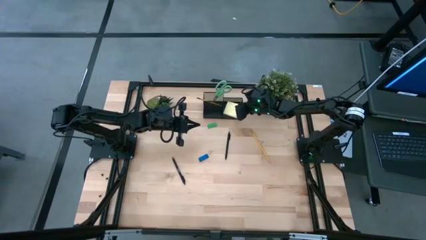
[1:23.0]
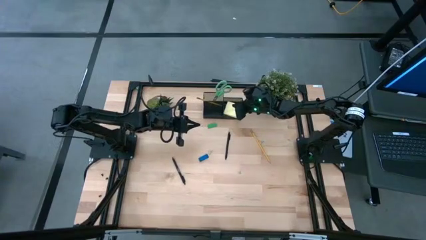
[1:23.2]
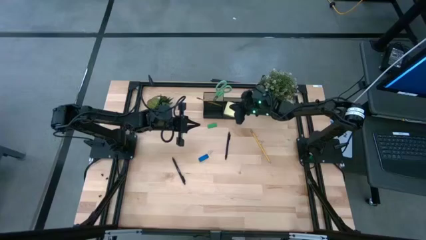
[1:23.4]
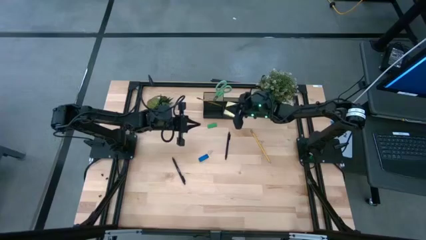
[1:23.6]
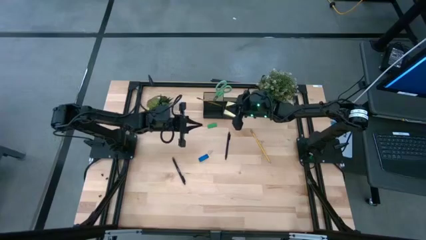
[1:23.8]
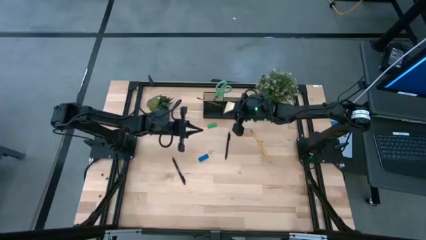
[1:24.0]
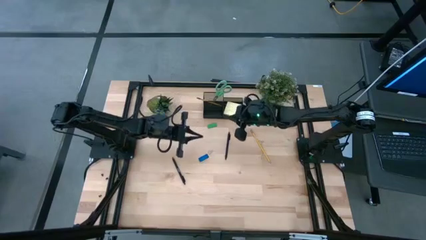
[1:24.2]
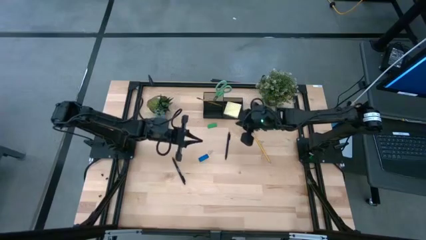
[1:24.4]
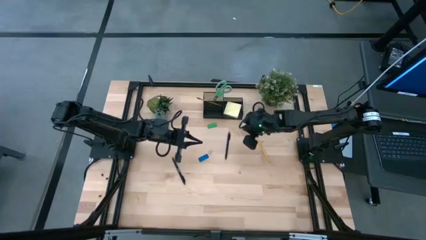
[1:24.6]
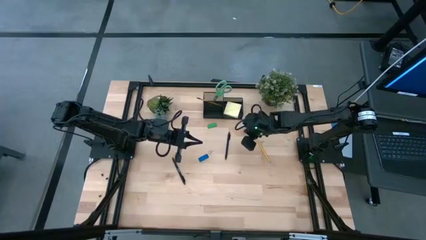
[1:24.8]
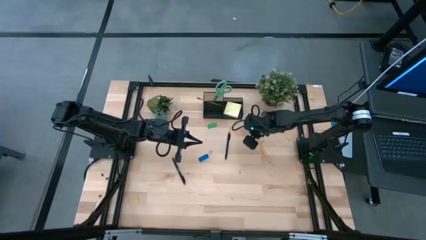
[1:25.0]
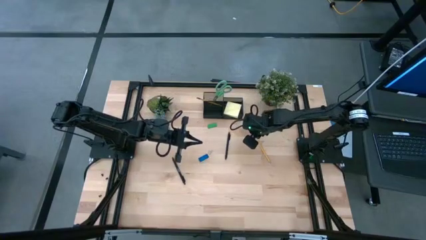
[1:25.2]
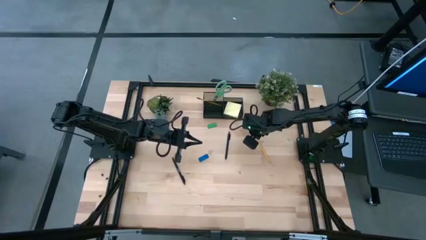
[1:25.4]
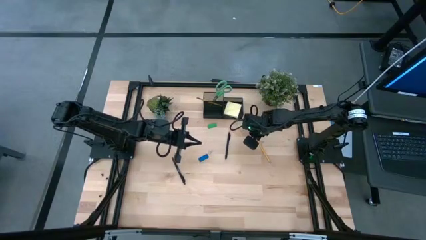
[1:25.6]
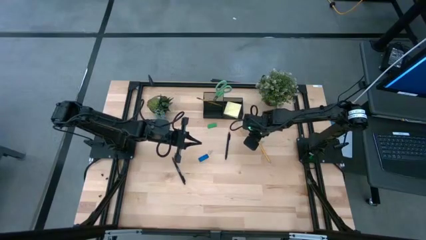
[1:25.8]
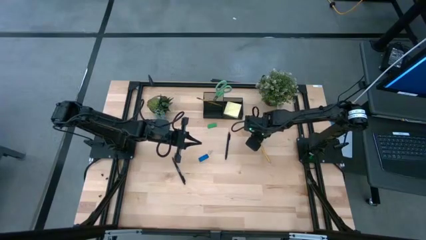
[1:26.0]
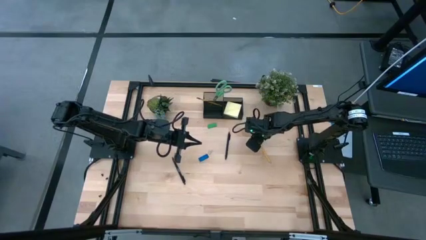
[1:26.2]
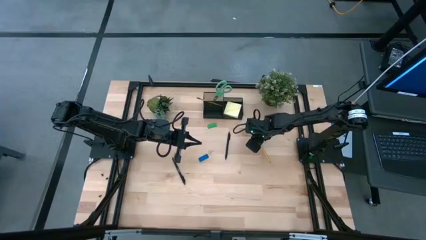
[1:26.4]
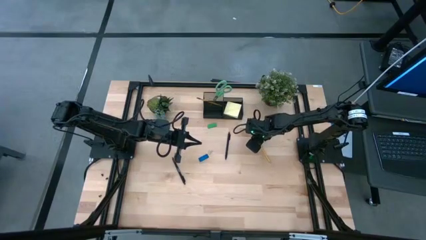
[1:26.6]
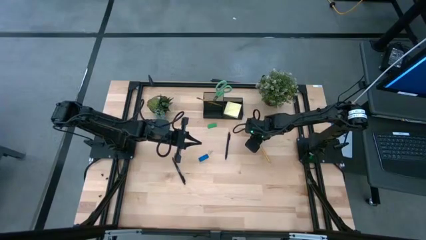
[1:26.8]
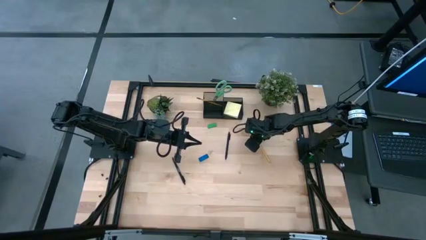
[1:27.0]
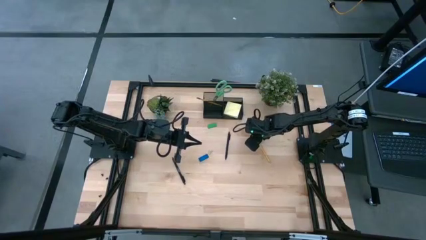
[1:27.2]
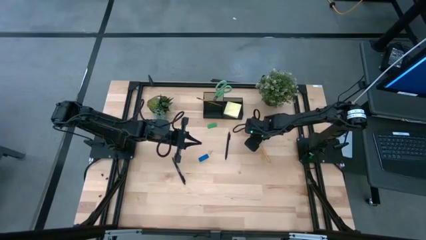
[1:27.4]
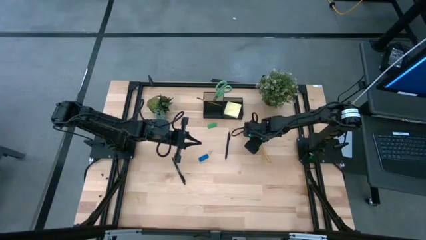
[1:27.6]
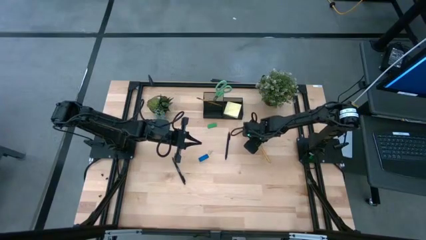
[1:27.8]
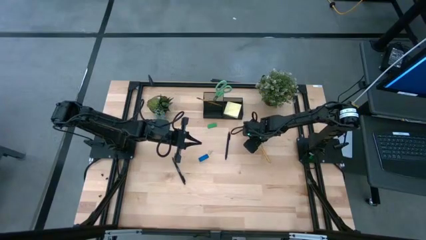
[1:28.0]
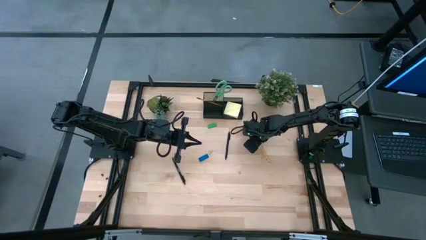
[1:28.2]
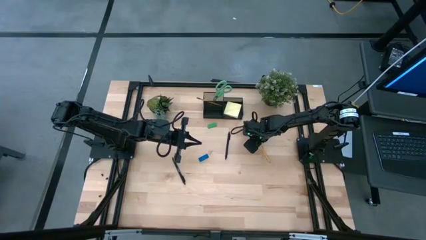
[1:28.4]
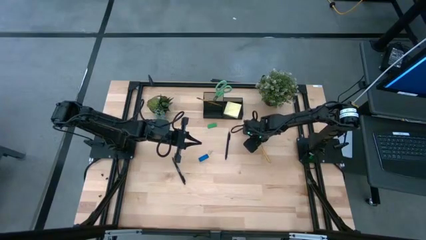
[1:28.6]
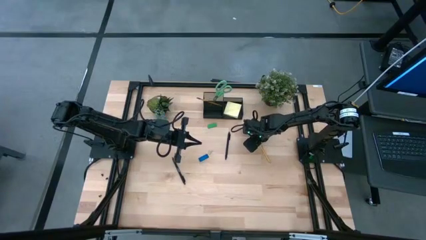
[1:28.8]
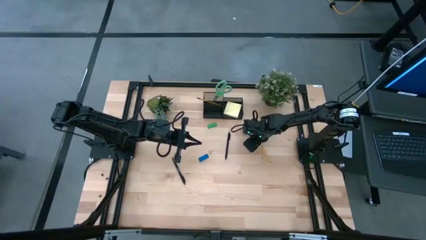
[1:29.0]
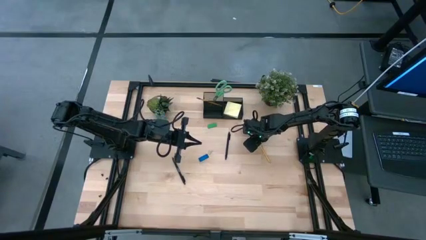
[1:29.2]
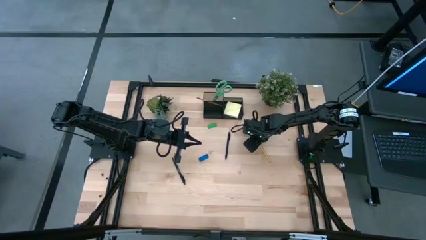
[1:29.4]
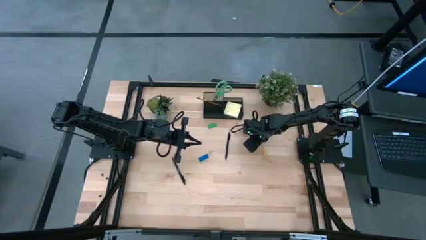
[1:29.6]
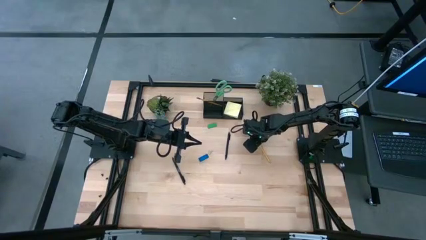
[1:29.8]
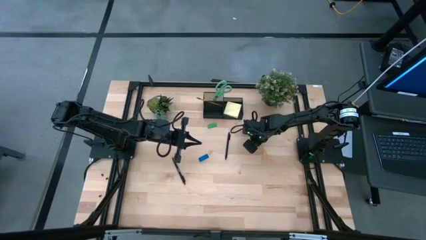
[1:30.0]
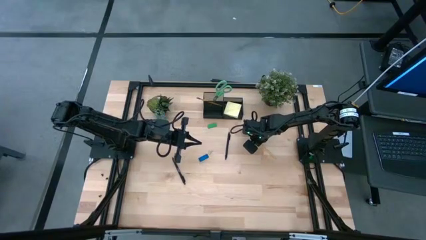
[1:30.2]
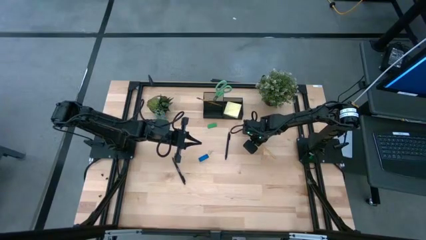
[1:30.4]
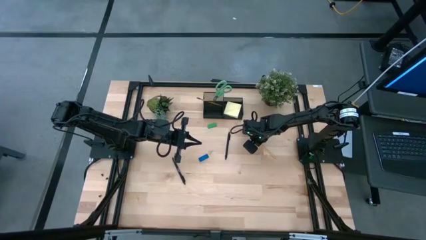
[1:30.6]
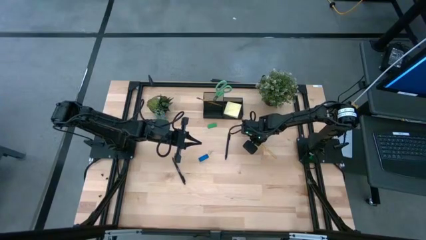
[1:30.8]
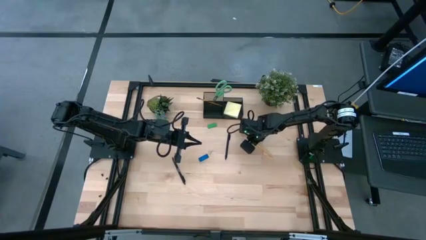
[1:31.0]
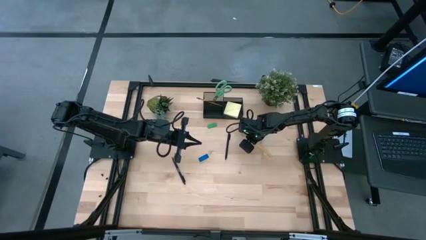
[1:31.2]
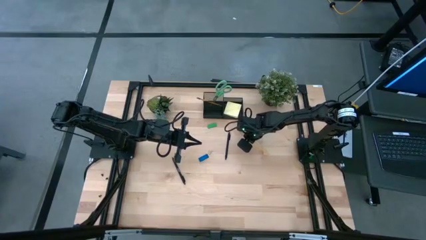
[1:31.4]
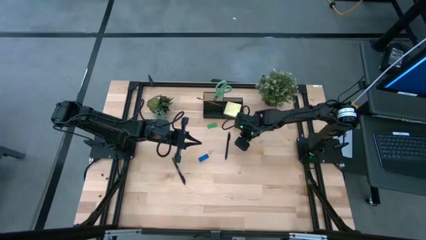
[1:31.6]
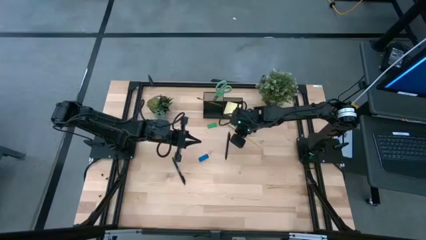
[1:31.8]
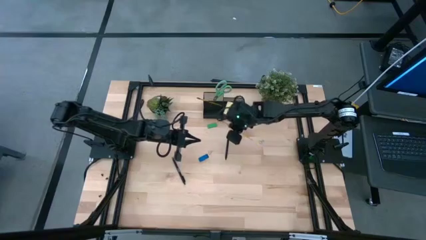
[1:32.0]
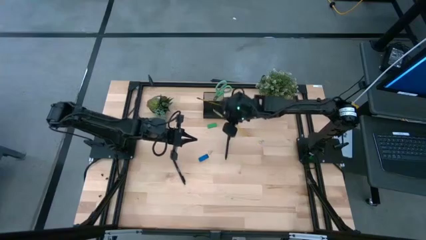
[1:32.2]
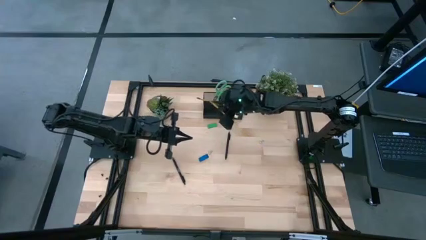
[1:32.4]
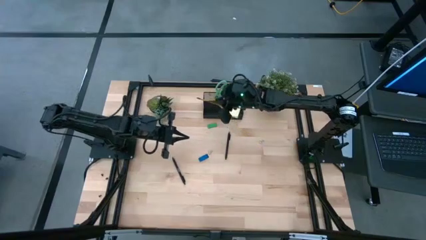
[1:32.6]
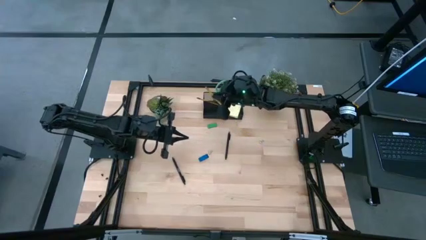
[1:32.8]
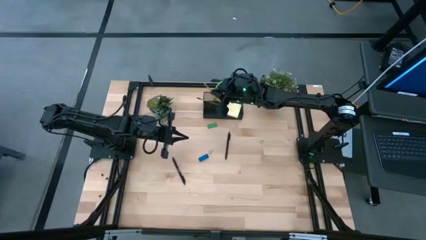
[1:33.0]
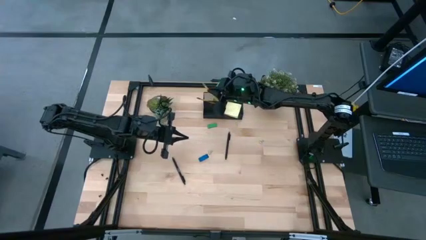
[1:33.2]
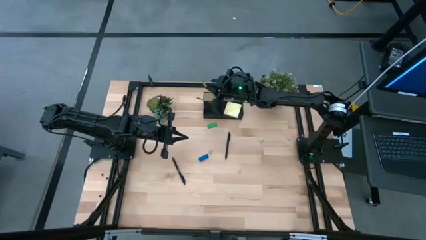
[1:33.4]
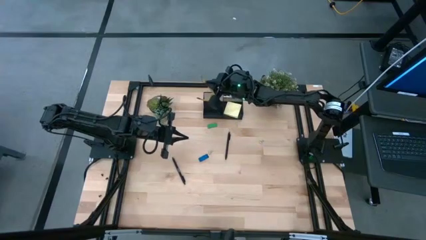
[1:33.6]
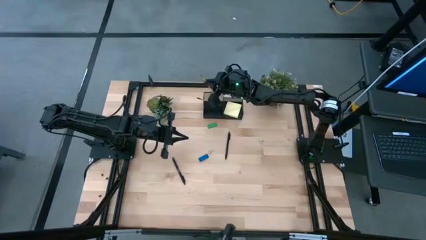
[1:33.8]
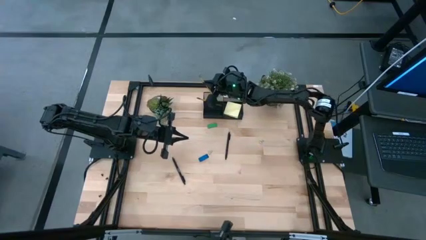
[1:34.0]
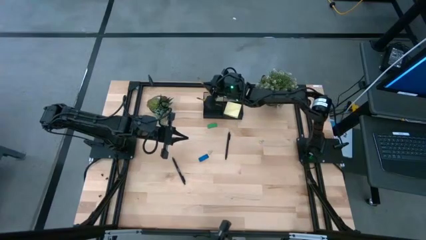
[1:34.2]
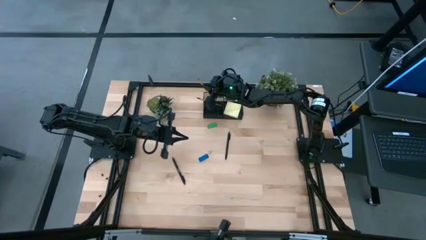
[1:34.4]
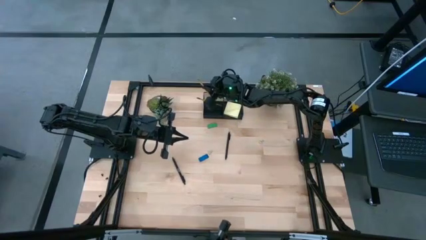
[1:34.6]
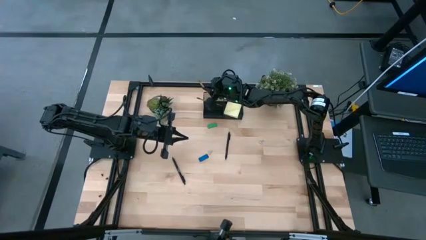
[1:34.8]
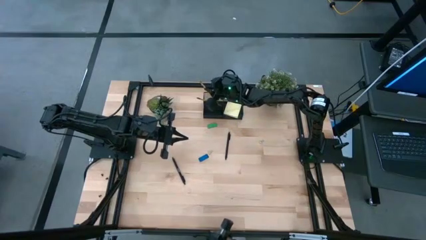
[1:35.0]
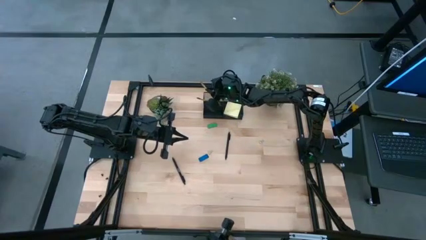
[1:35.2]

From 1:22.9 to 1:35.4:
Task: Pick and place office supplies into organizer
Put the yellow pencil into the black desk organizer
